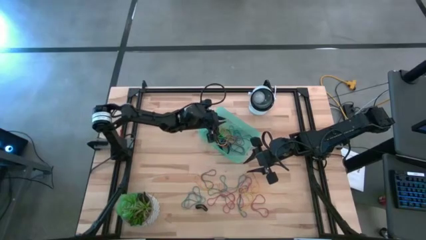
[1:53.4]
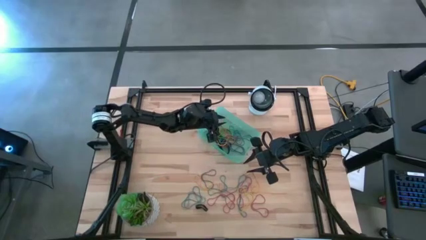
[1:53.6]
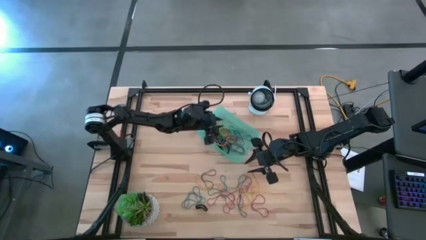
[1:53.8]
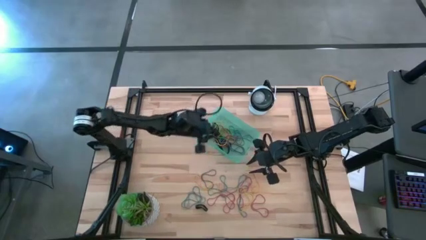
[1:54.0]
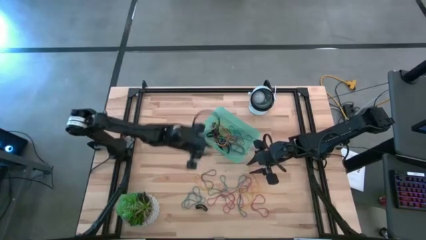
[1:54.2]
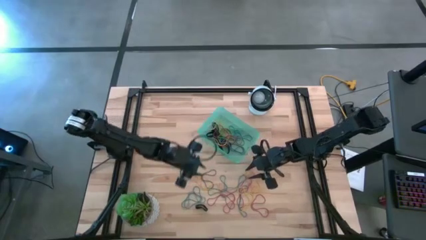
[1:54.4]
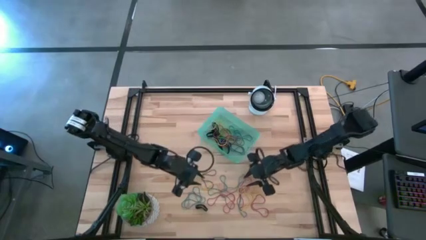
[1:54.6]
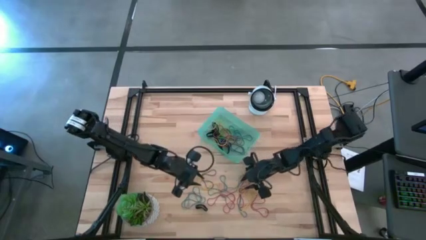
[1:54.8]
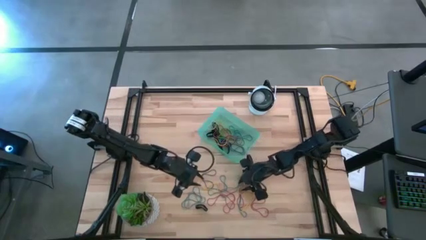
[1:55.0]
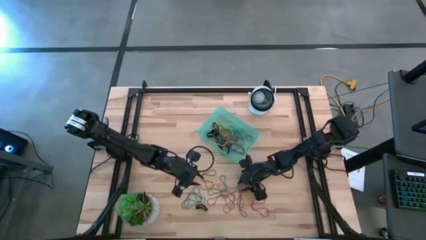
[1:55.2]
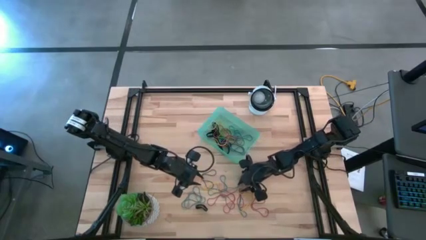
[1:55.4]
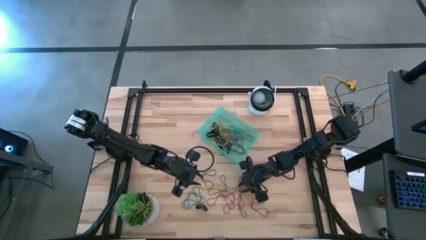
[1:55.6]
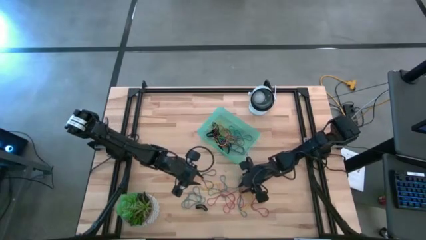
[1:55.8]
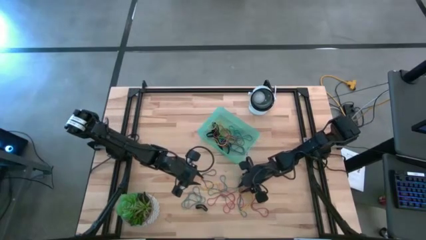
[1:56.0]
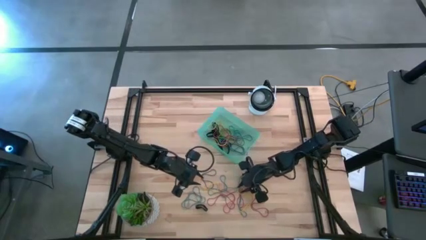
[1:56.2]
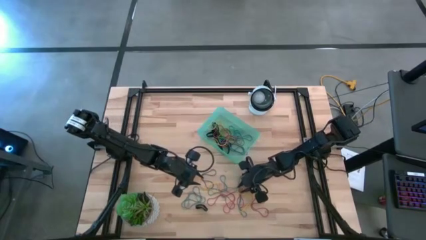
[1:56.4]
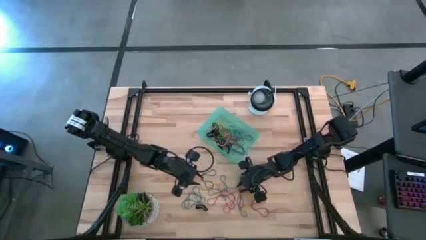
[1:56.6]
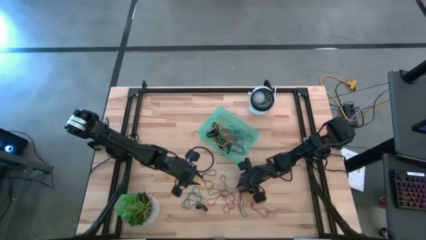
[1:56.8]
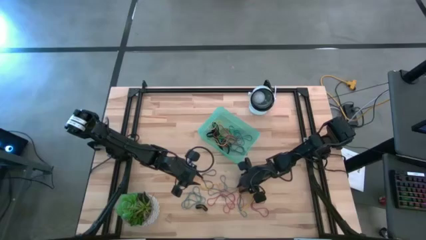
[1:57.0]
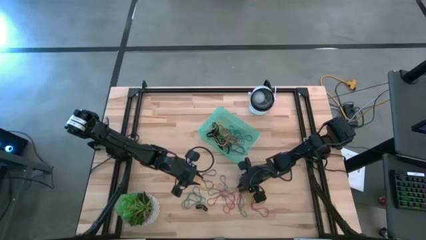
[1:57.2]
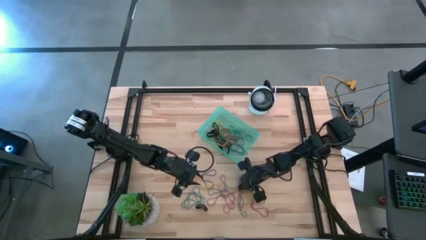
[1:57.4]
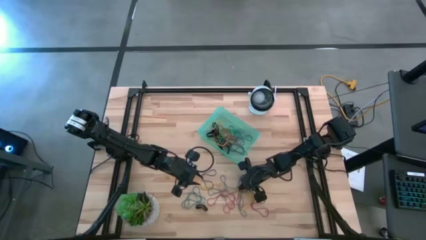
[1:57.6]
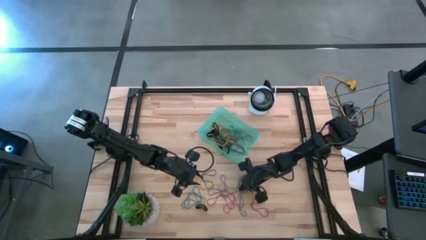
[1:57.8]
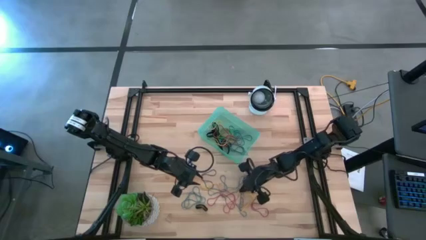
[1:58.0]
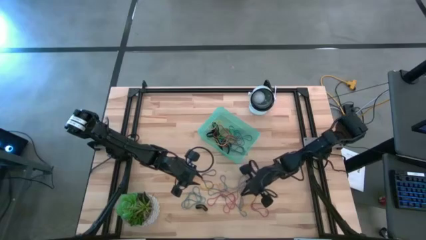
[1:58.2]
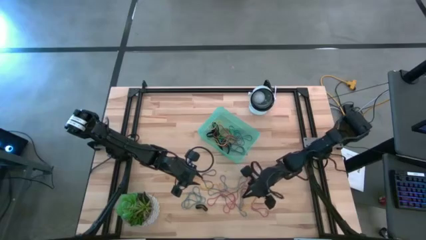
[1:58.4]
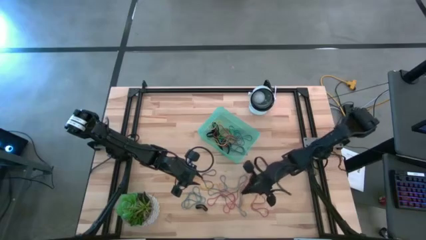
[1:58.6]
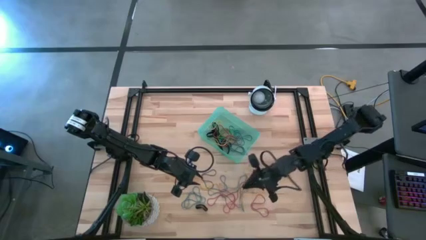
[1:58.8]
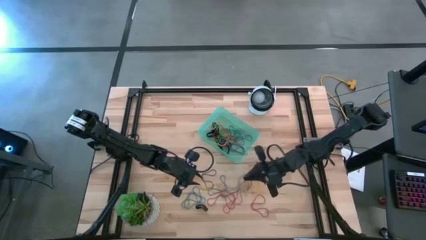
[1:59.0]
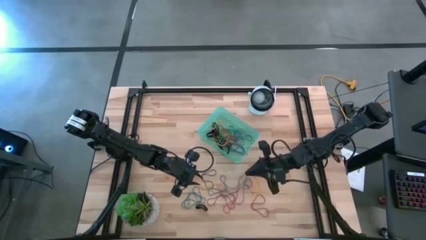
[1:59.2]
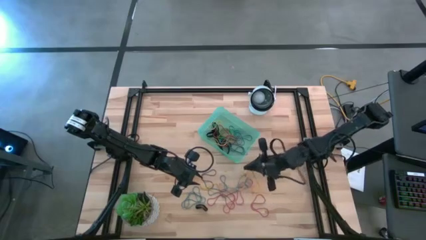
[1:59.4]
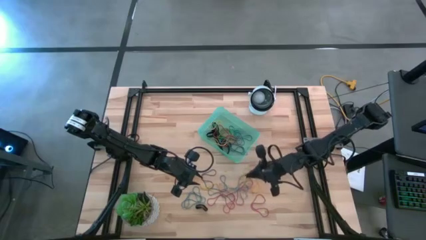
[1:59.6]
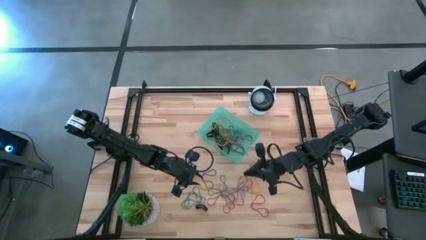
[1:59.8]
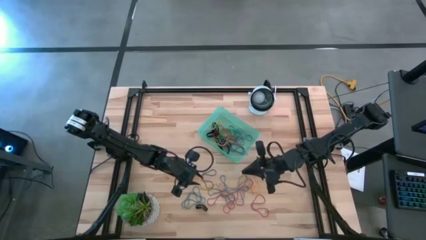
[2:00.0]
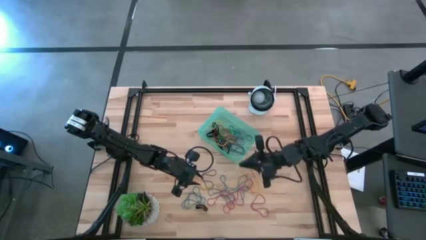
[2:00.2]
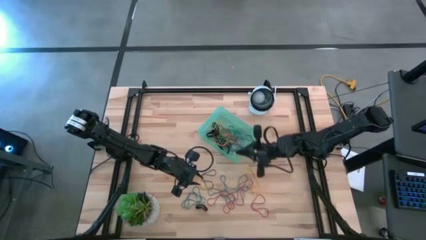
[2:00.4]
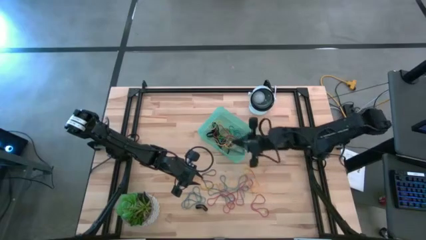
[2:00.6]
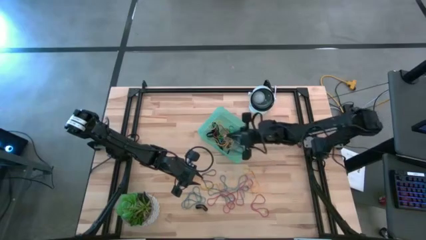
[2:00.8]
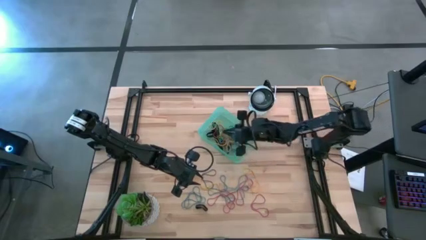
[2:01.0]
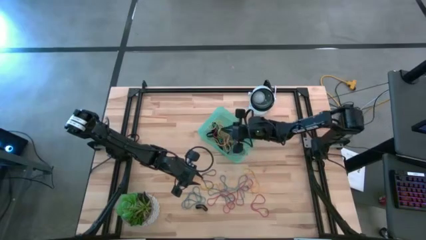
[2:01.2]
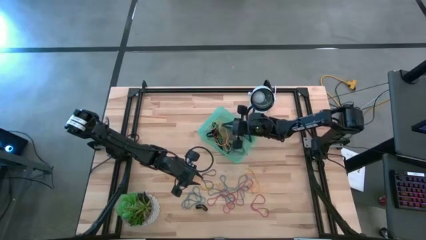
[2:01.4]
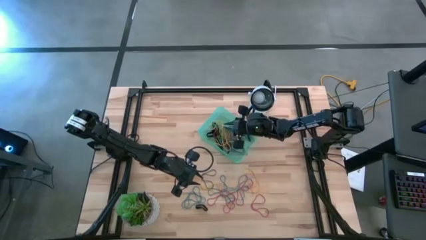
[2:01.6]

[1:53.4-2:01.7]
Task: Pick and place rubber bands into bin
Put the yellow rubber band into the blue bin

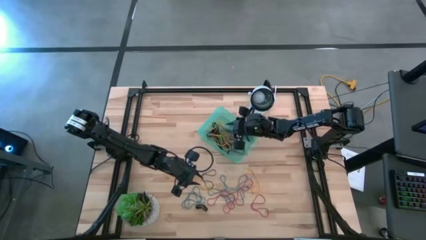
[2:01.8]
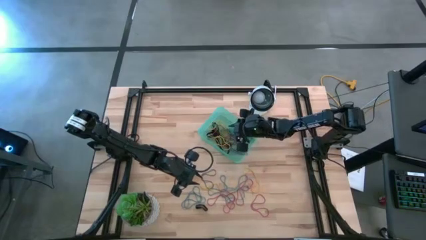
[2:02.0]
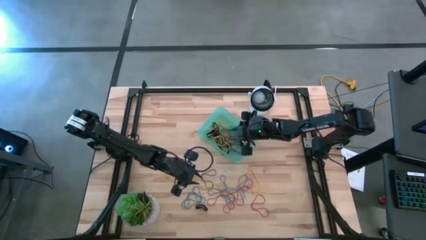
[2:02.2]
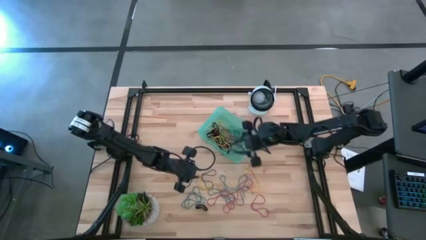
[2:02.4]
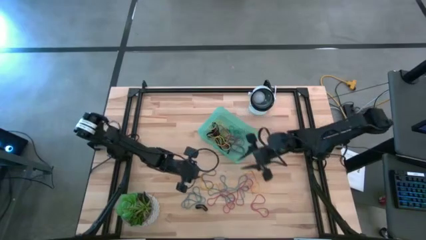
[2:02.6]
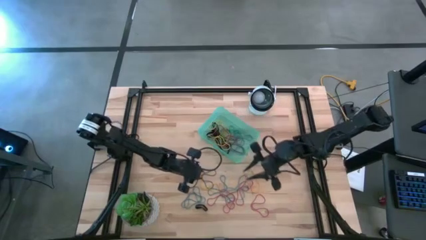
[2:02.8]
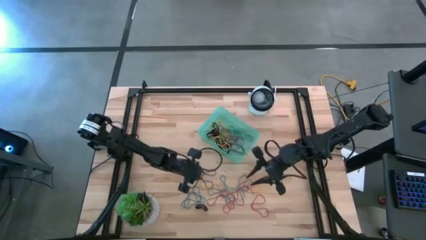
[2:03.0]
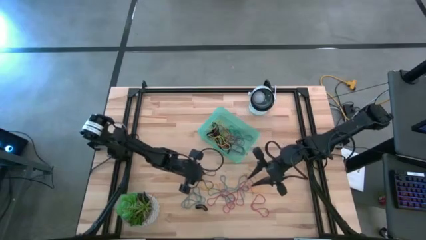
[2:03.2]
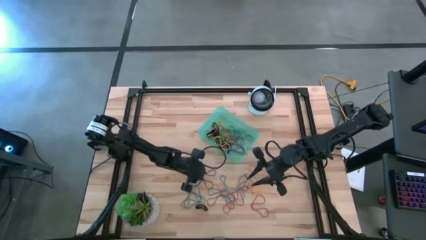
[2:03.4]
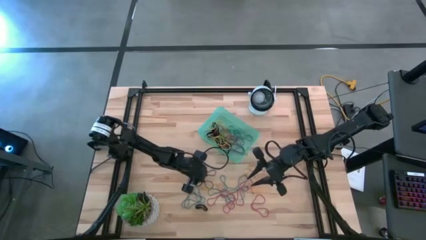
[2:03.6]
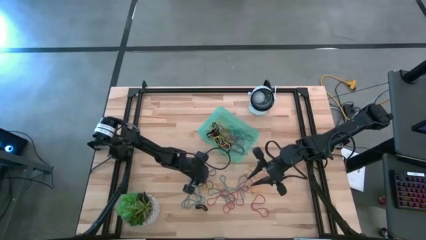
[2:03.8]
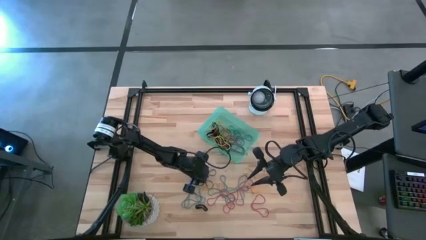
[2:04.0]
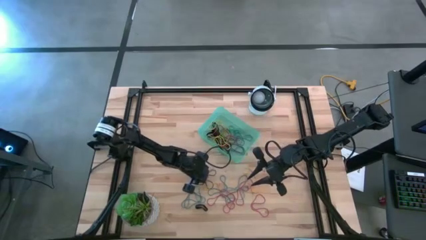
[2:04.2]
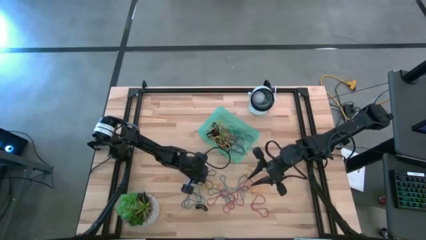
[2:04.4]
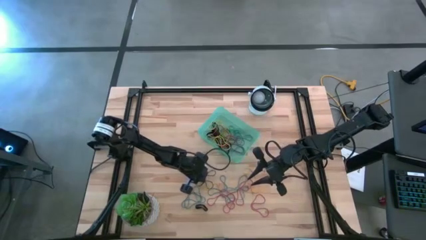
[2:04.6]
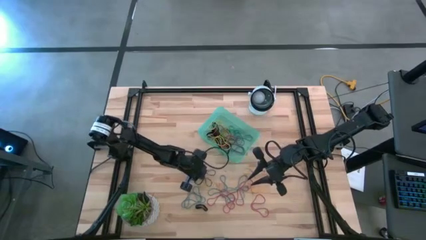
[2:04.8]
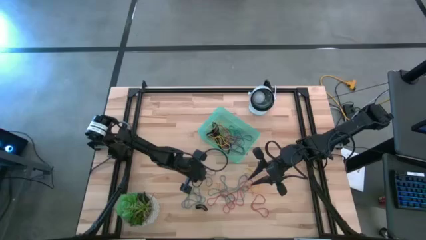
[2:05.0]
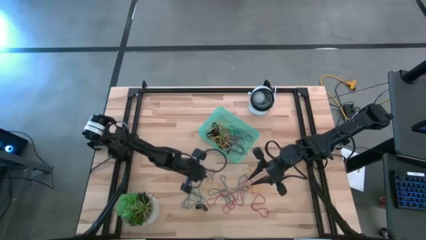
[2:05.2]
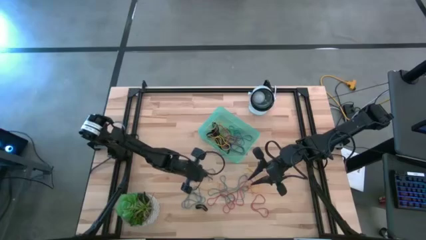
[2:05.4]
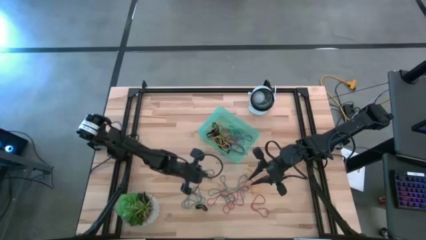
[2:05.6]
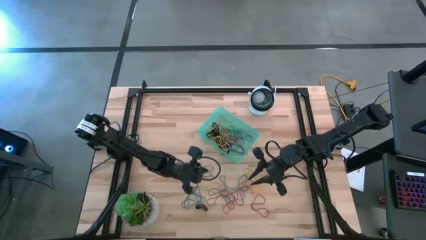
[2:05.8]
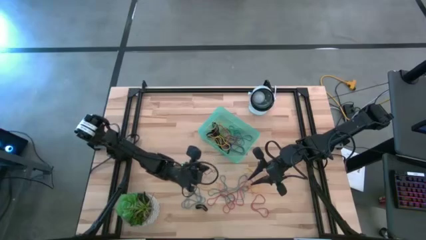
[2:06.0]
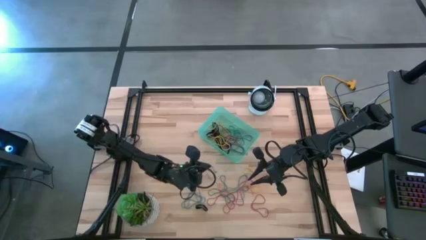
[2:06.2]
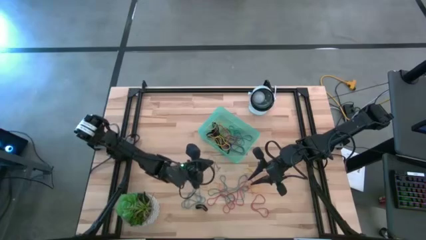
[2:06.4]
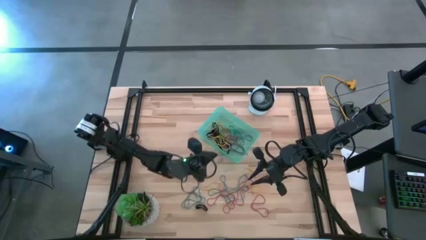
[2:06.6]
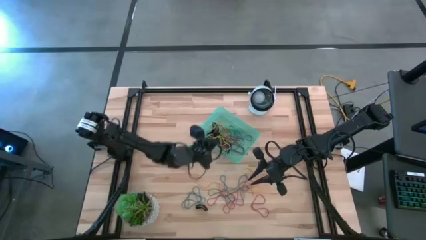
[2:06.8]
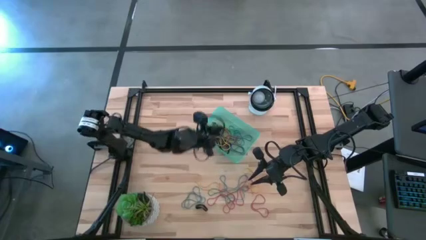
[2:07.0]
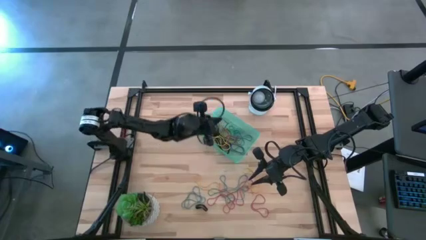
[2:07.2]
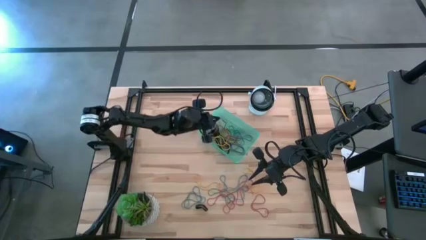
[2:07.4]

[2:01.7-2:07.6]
Put the violet rubber band into the blue bin

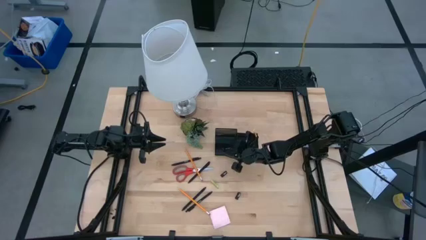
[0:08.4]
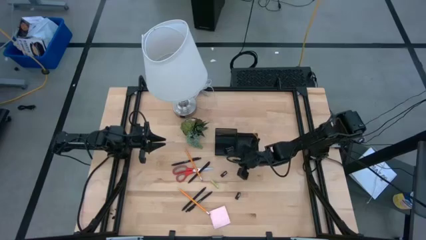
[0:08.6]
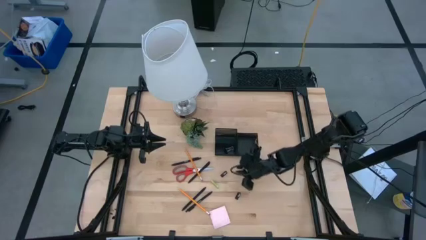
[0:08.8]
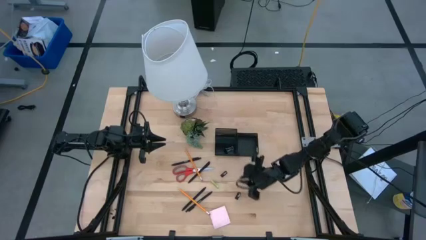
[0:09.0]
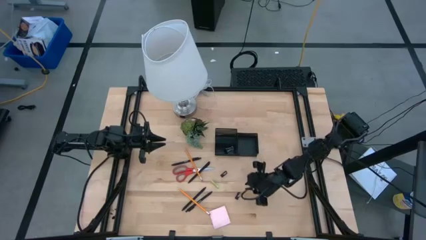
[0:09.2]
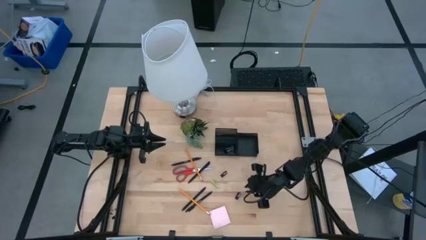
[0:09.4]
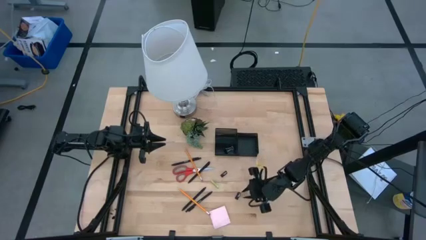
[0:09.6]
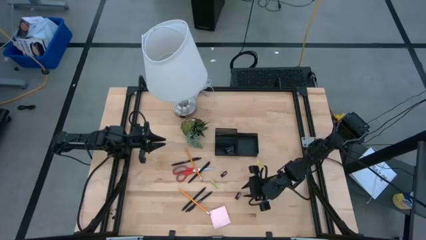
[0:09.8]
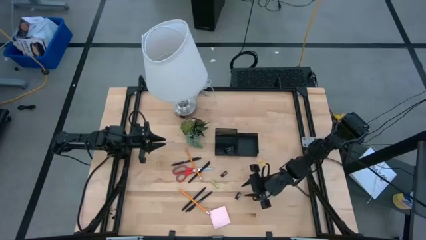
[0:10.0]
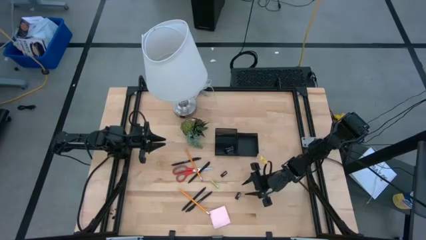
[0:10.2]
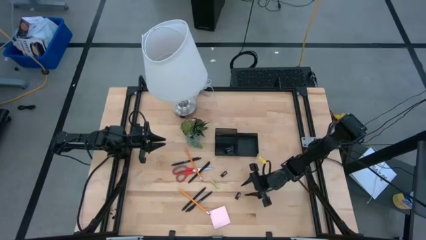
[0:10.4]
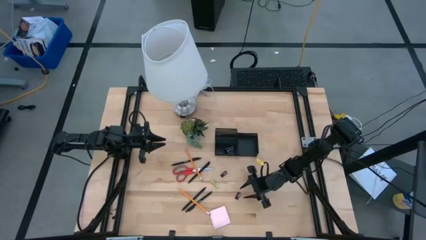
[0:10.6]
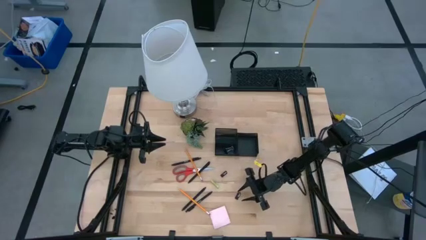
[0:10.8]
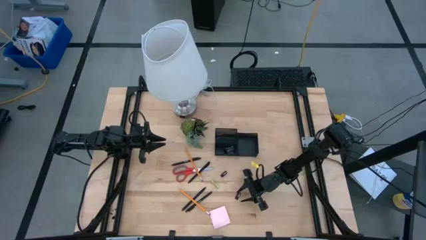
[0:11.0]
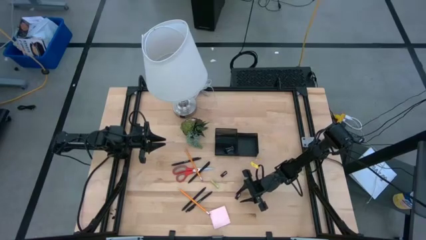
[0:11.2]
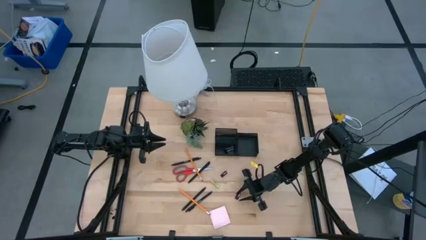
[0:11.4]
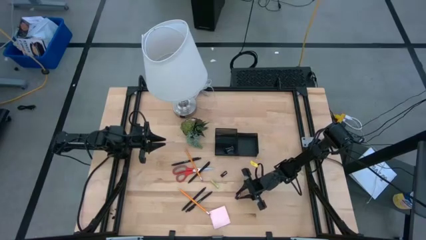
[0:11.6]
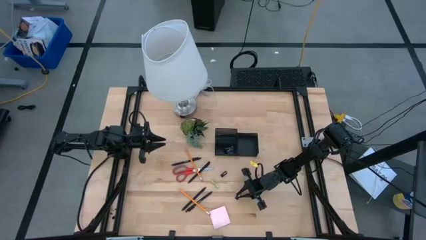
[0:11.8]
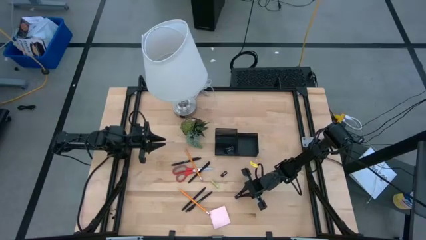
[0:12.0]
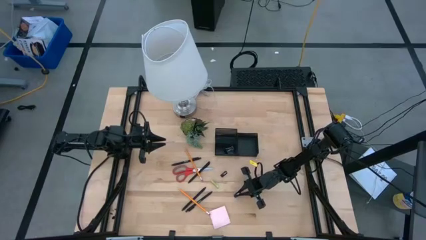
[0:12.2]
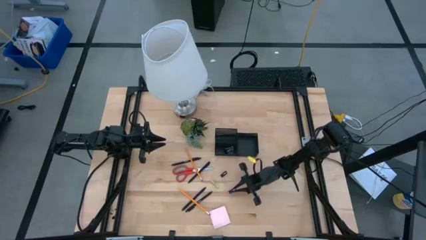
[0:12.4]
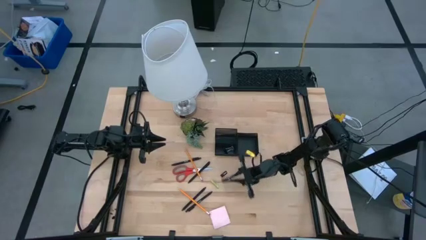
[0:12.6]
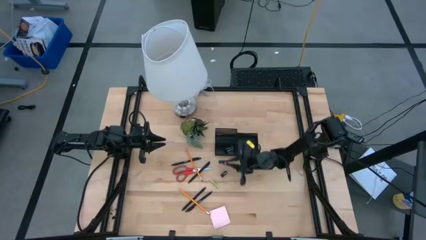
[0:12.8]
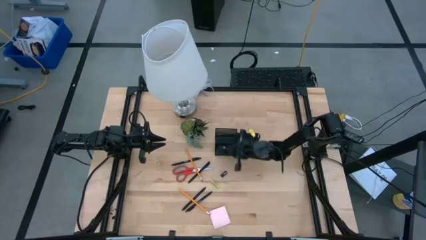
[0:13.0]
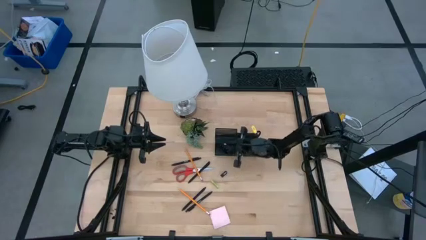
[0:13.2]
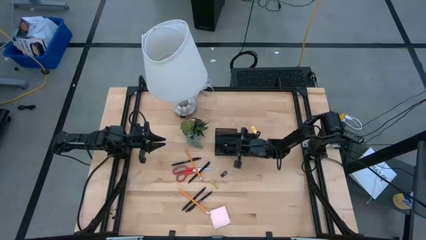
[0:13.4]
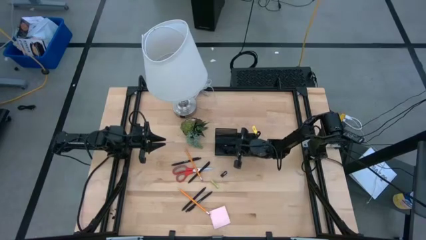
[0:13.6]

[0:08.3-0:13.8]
Task: Pick and place office supplies into organizer
Put the black binder clip into the desk organizer
